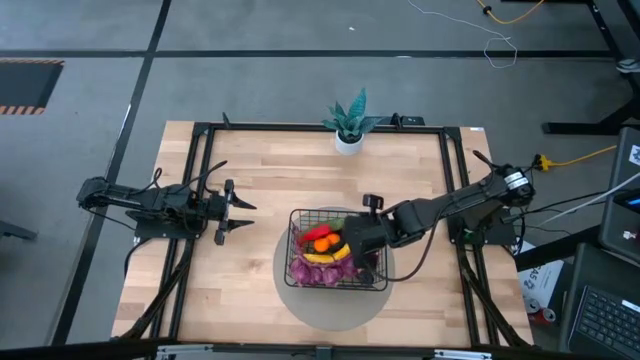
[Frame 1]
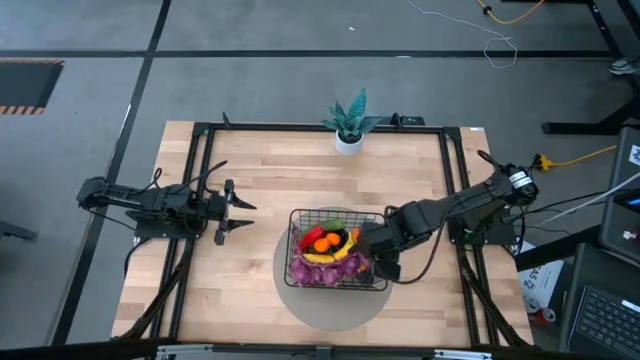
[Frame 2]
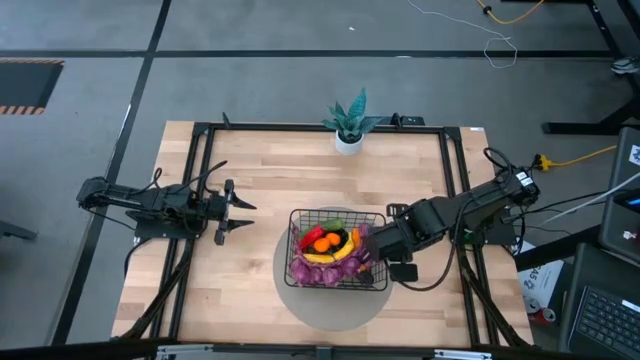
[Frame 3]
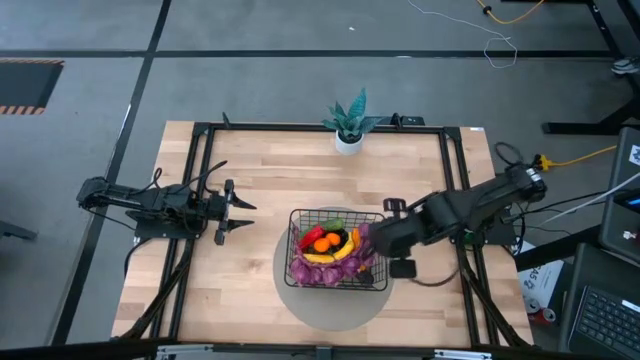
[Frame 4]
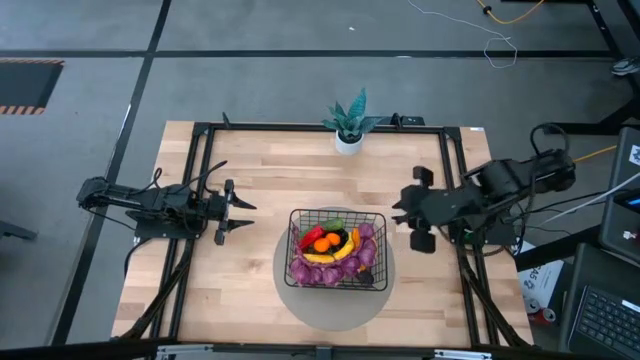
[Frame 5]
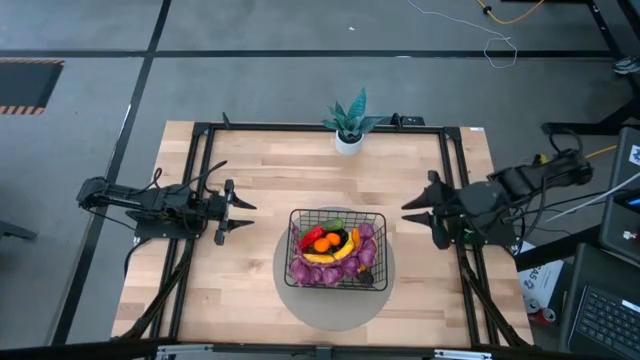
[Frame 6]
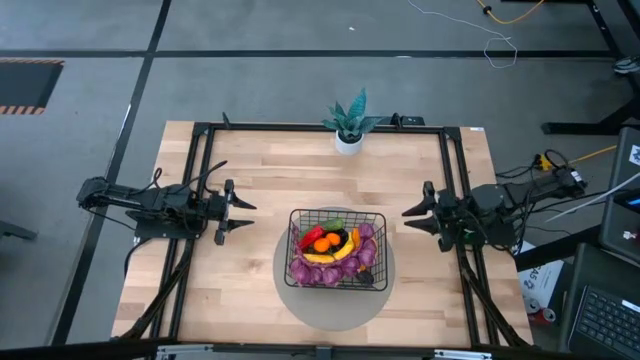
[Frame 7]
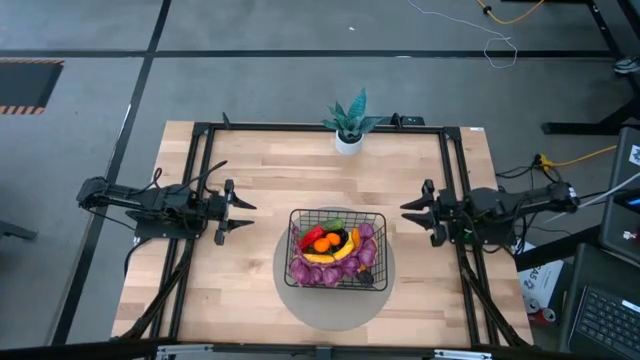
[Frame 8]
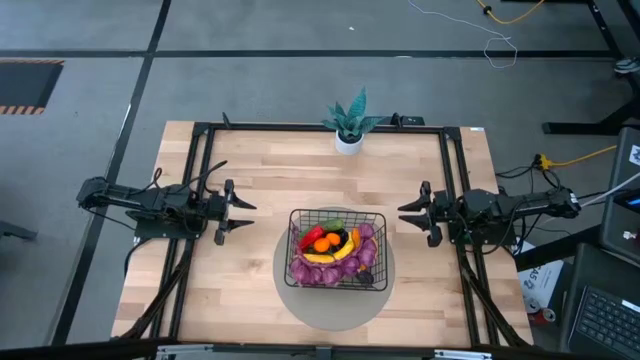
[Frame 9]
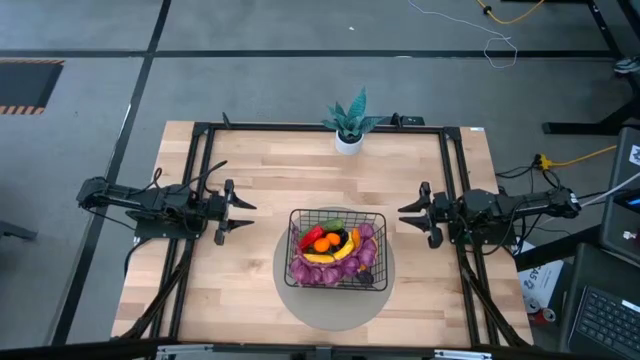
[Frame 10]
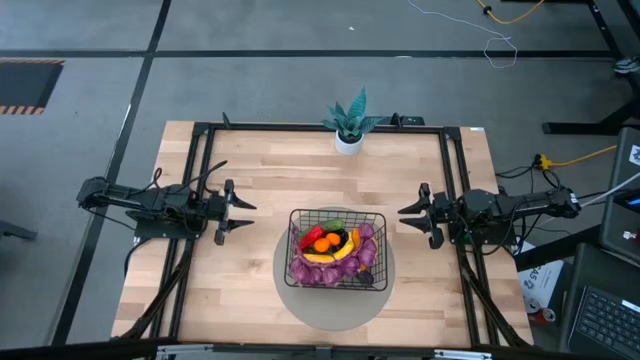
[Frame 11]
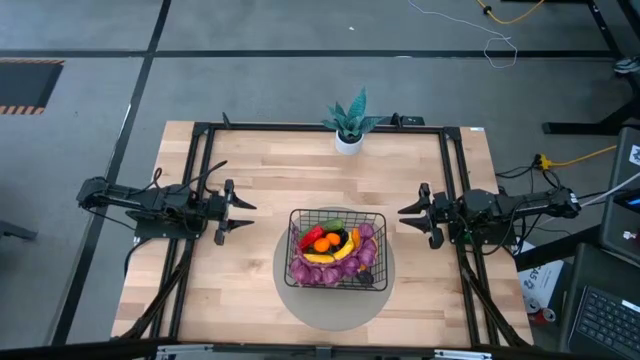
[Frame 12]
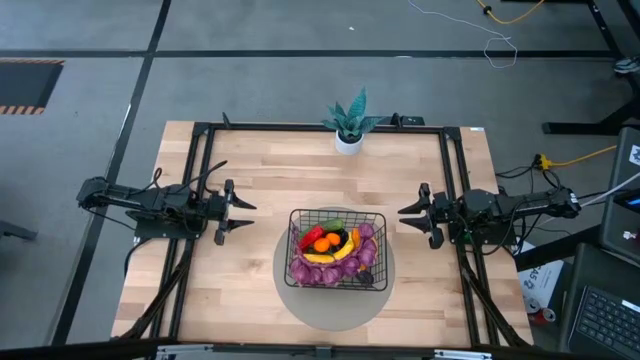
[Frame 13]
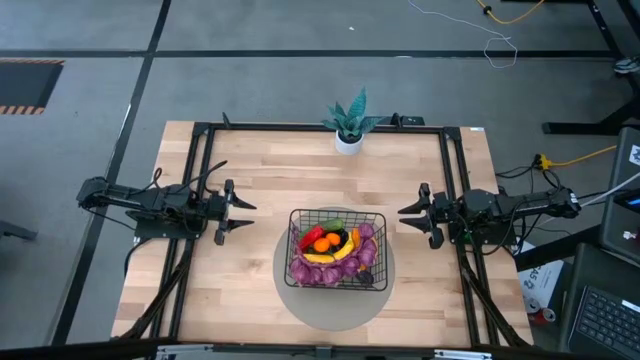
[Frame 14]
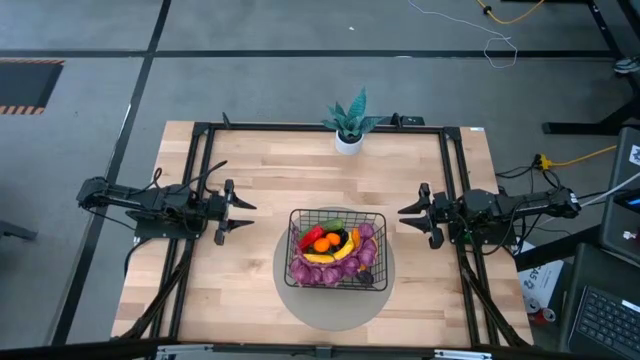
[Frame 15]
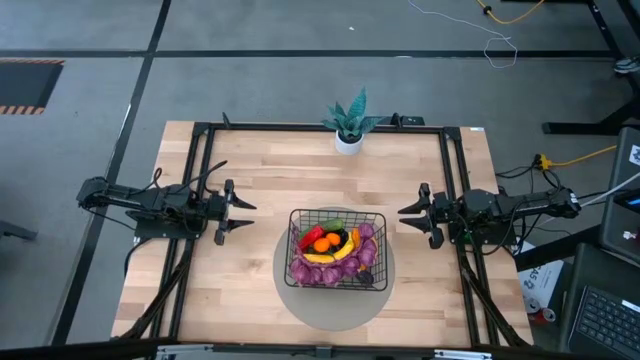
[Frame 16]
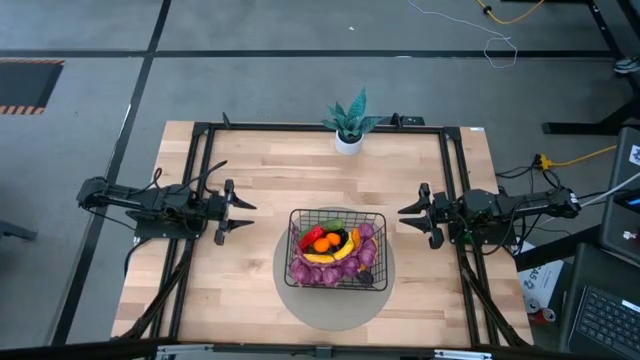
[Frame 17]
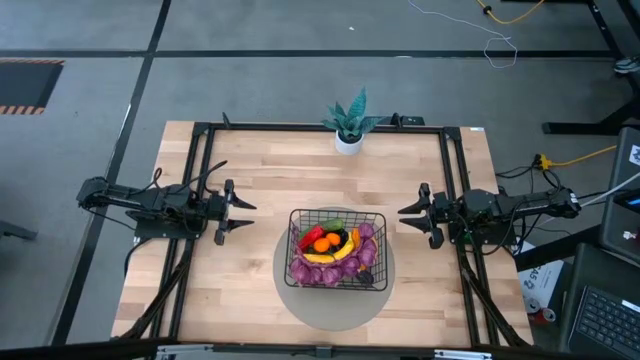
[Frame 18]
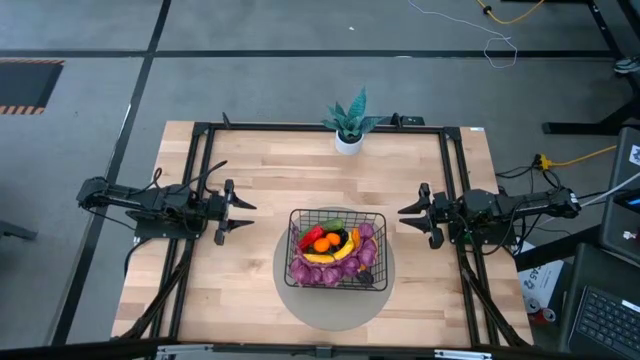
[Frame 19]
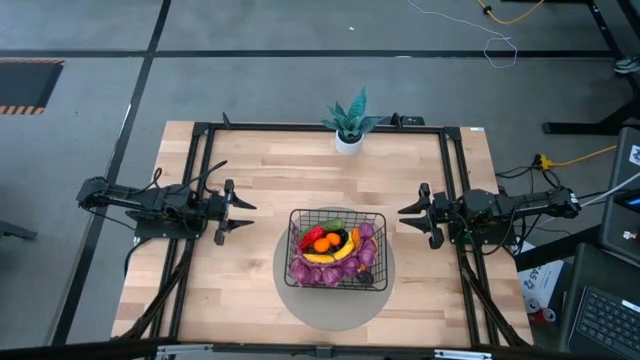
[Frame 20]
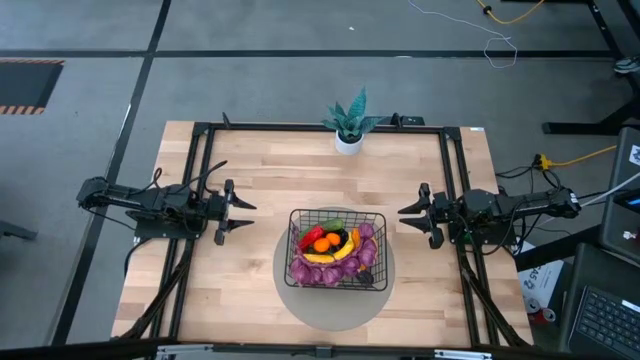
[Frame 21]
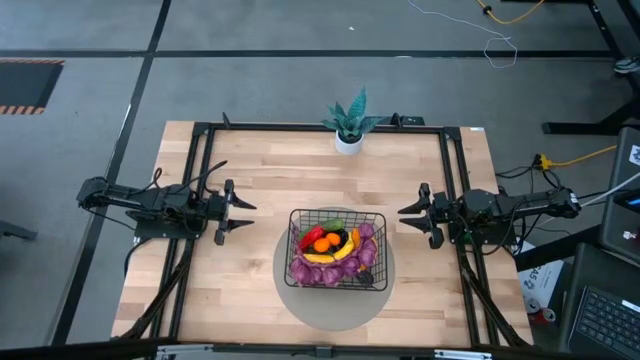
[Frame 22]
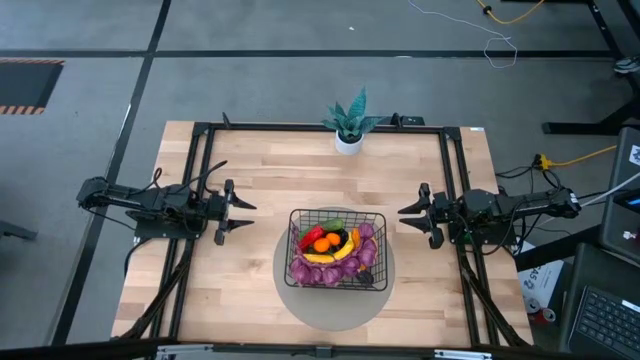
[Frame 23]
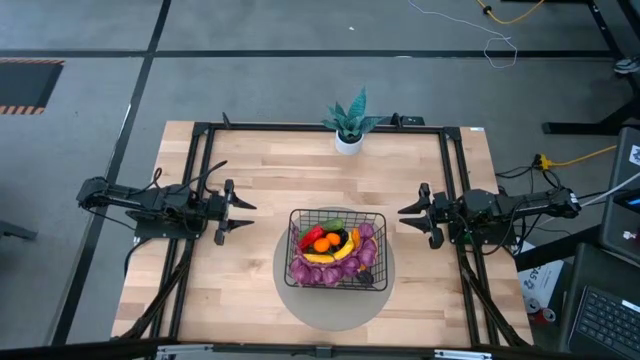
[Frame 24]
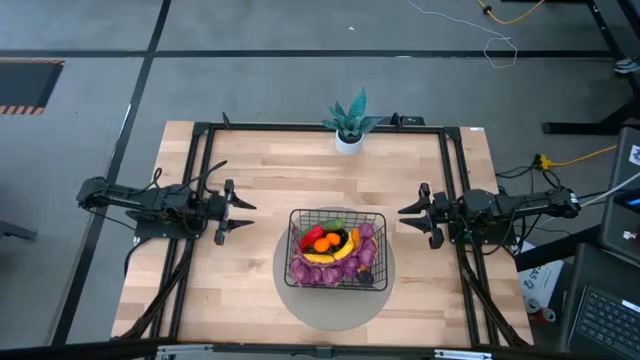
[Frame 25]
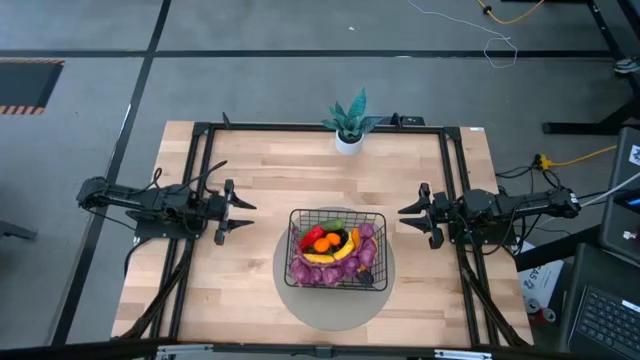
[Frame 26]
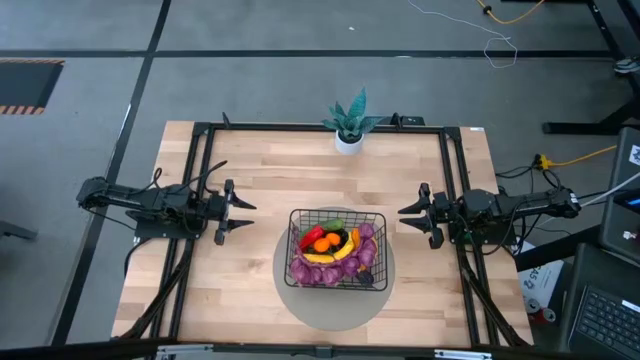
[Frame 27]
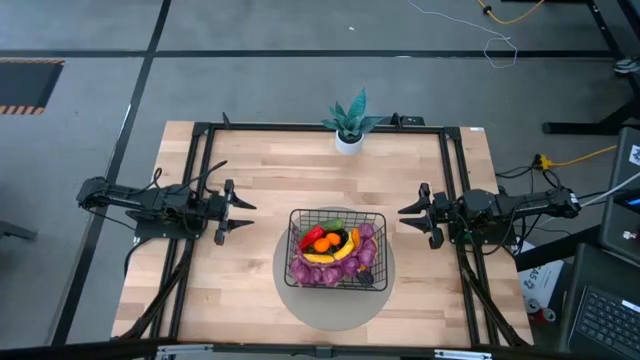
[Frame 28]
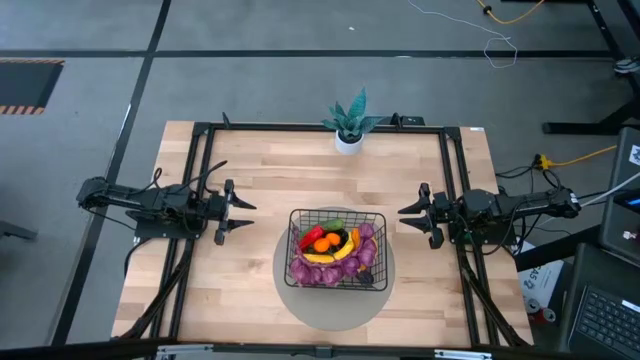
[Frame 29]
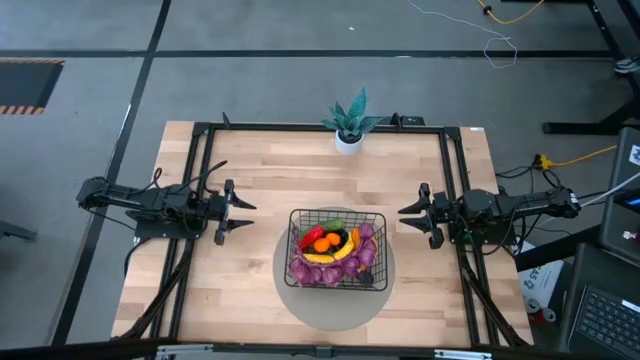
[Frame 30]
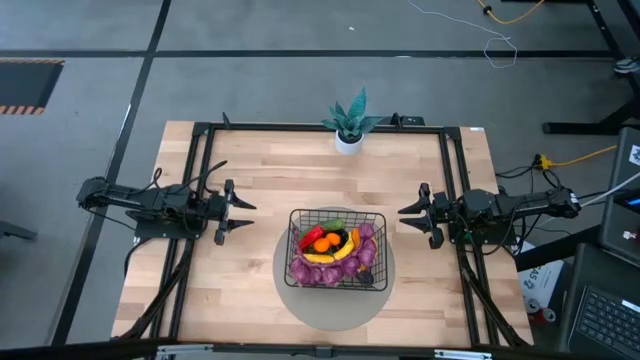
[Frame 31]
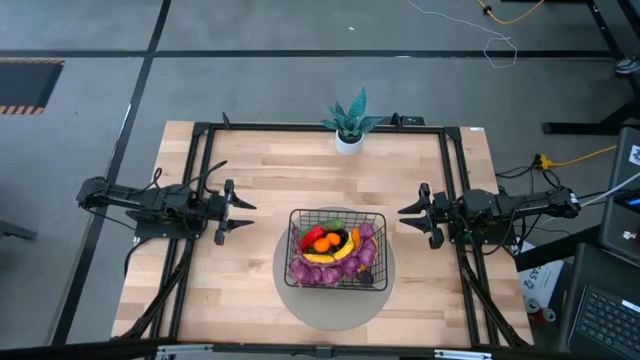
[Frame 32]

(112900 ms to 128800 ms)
Task: Build produce basket
Return to Home Position

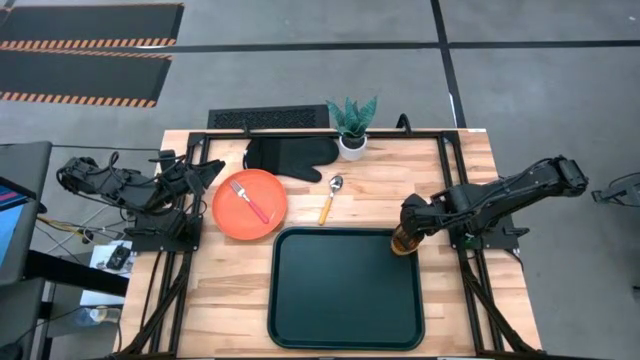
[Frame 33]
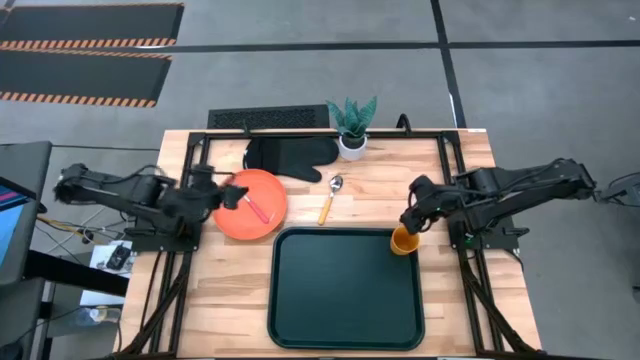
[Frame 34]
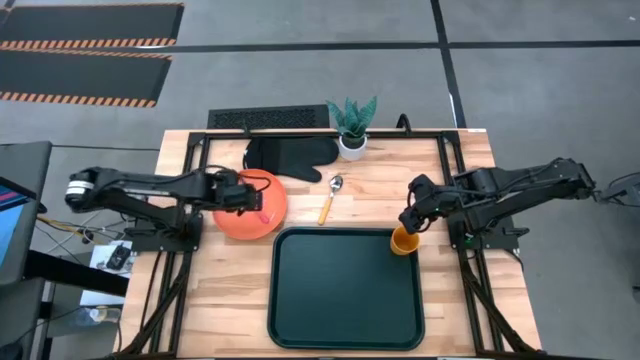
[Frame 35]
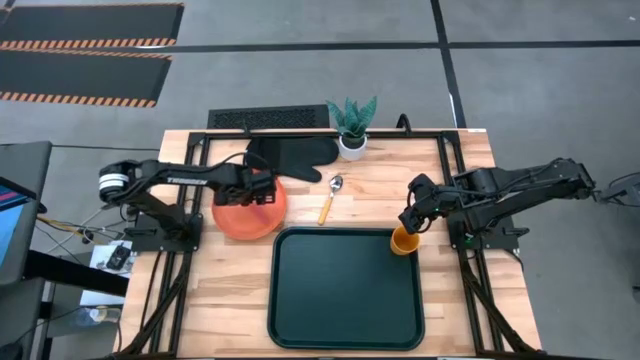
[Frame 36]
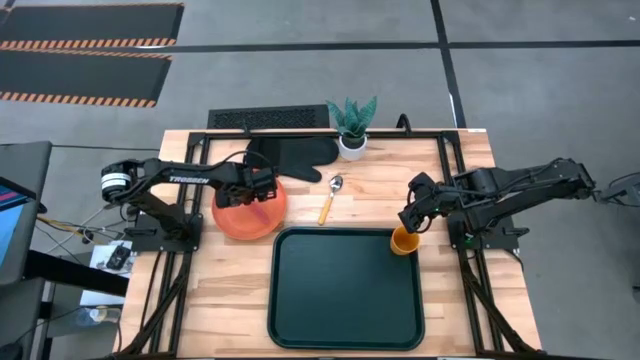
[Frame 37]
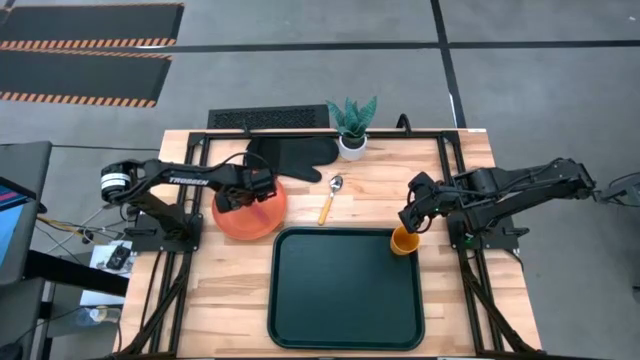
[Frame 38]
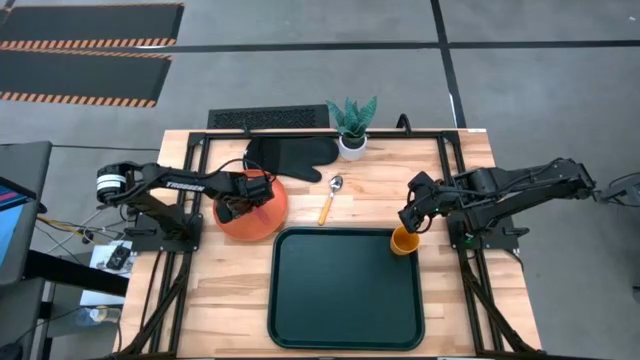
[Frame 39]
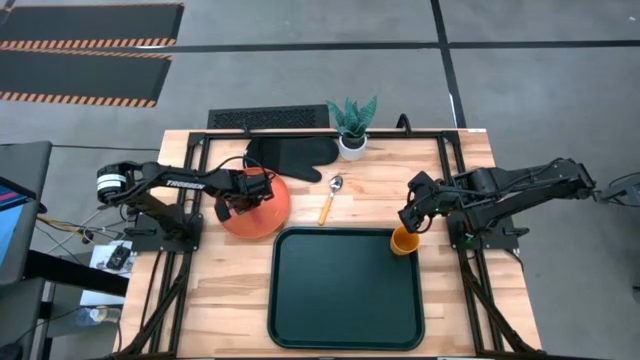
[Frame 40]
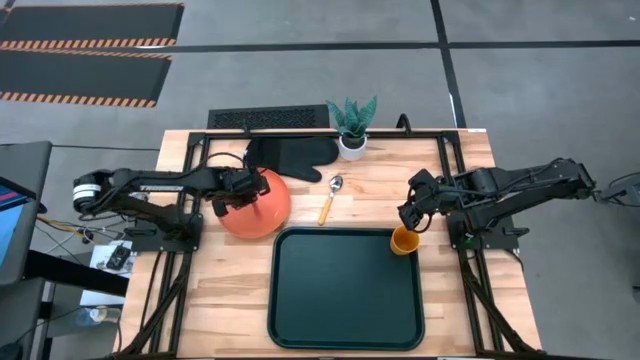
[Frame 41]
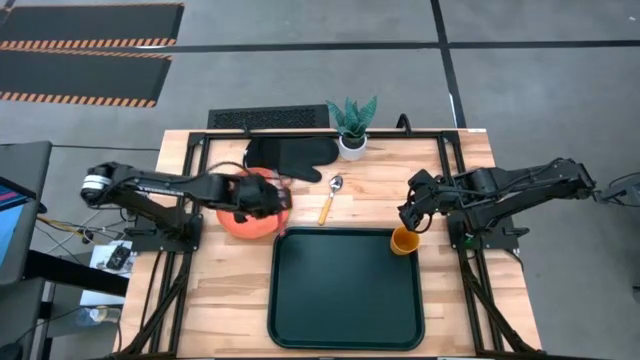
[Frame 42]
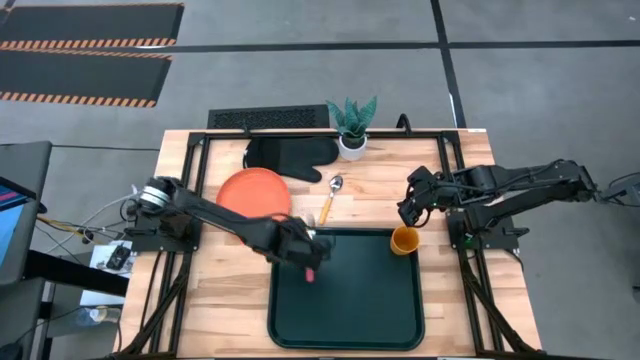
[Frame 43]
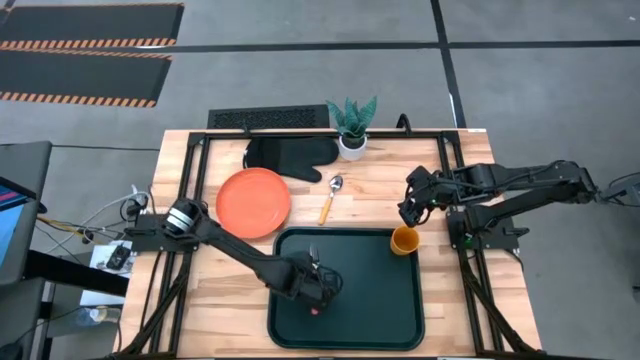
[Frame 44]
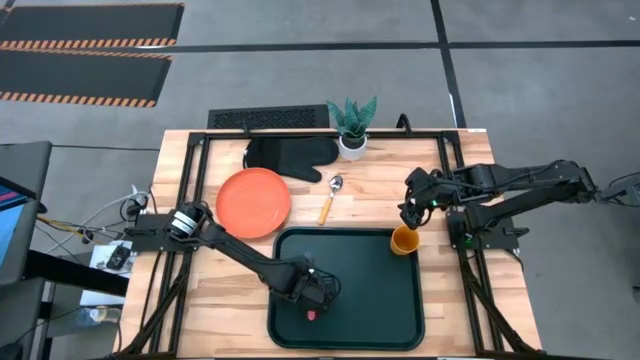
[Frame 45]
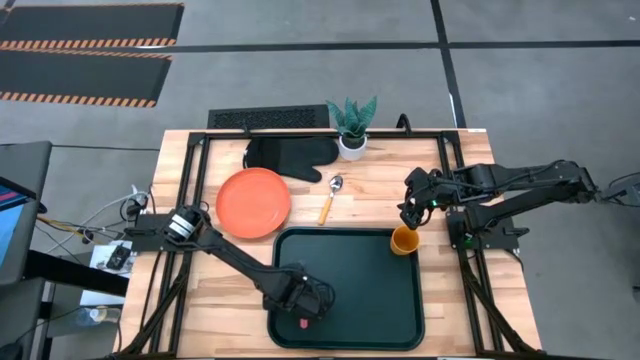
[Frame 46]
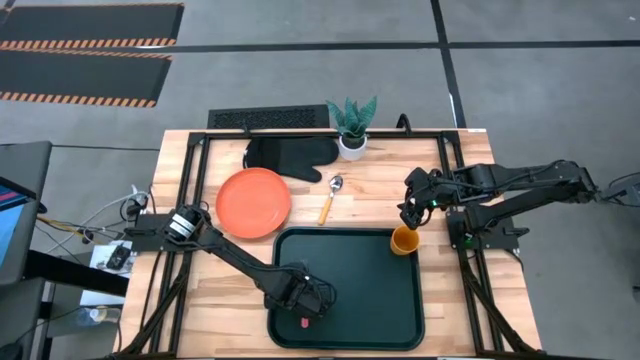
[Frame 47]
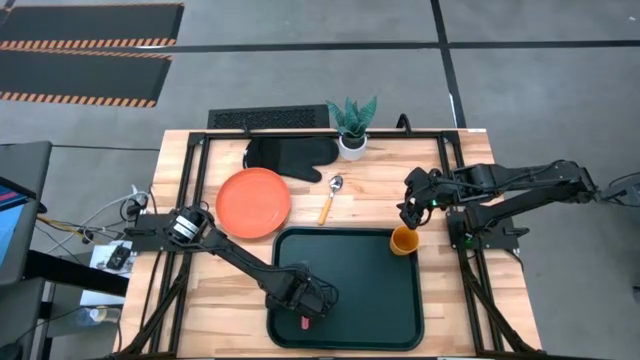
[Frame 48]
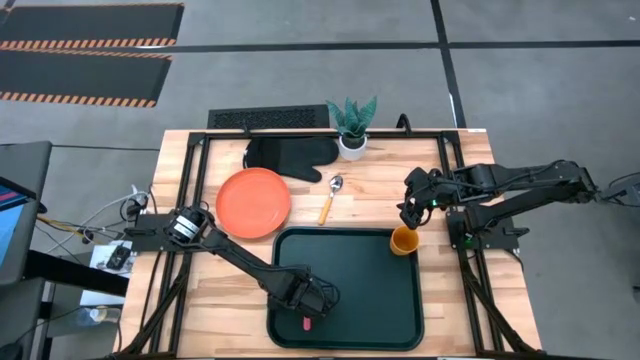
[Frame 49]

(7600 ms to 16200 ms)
Task: Pick and place plate/cup/fork/spoon on tray
Put the pink fork on the black tray
